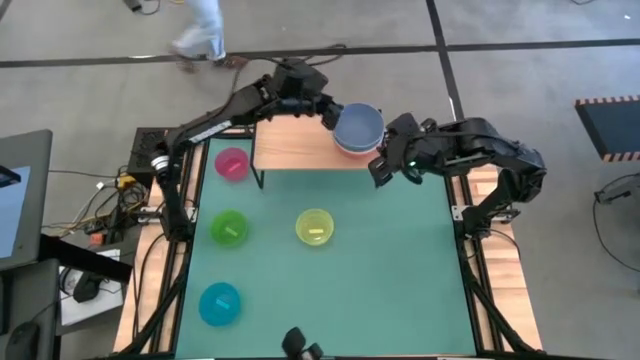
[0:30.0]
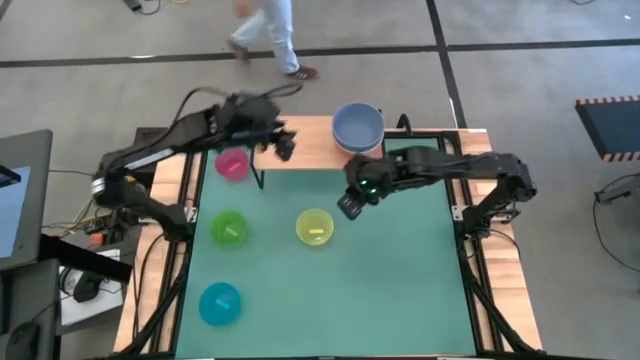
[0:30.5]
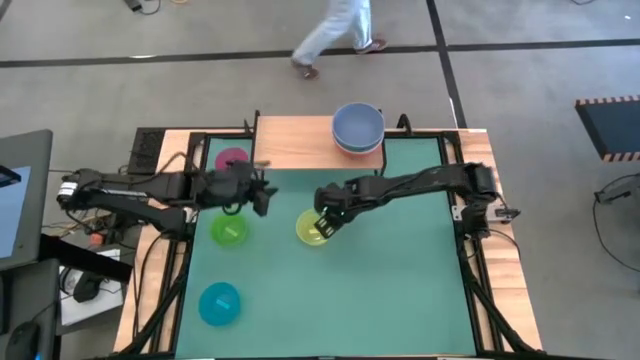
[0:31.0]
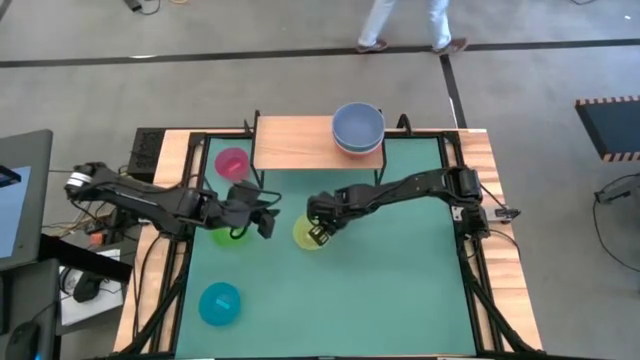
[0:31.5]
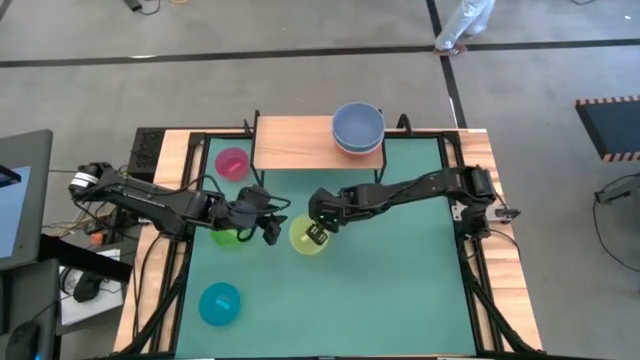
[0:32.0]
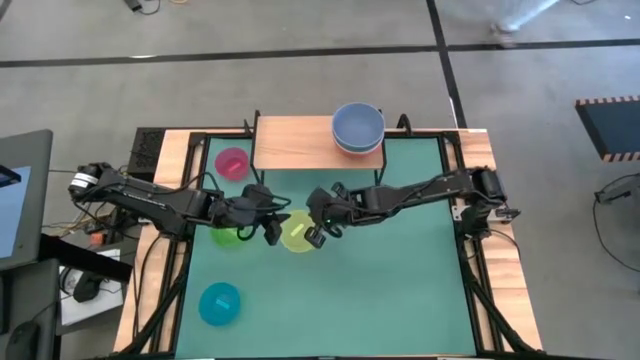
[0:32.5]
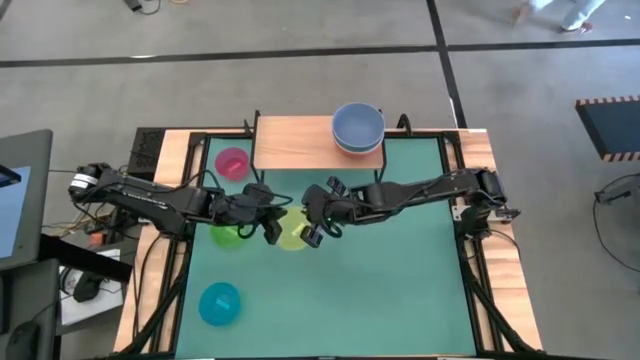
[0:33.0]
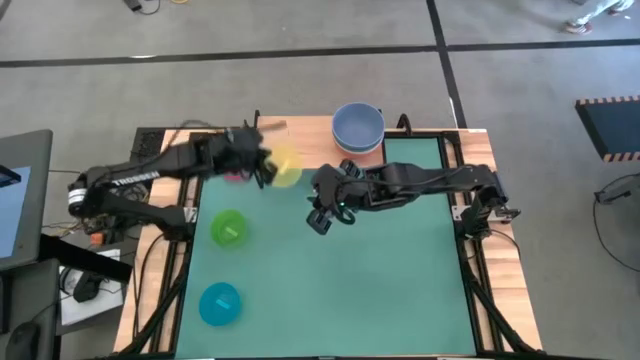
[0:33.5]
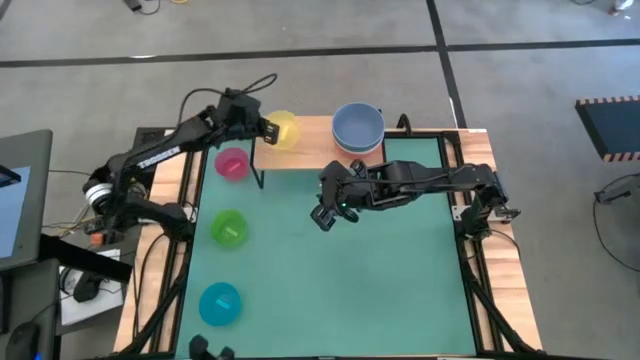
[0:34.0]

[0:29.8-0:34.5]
Task: Place and stack bowls onto a shelf
Put the yellow bowl on the shelf

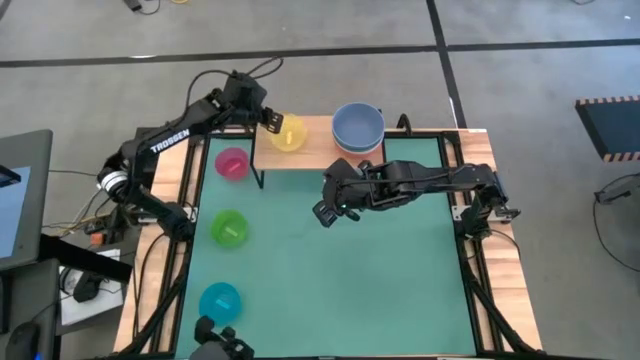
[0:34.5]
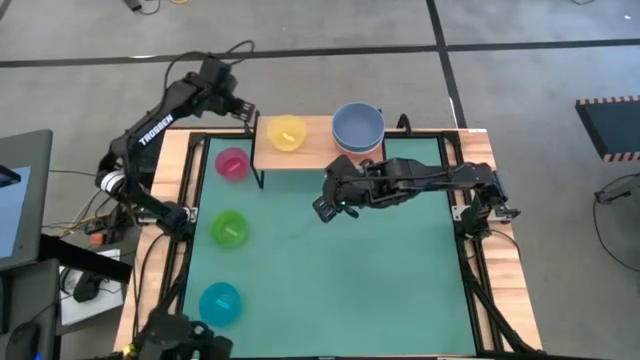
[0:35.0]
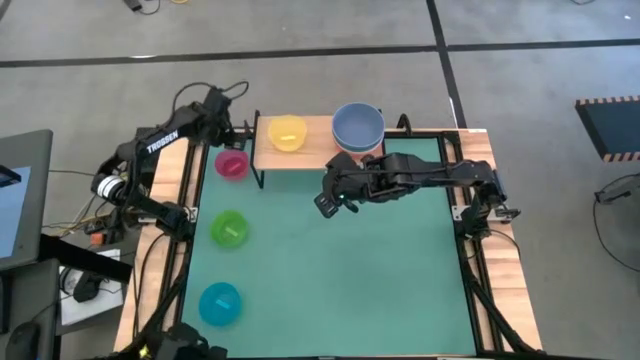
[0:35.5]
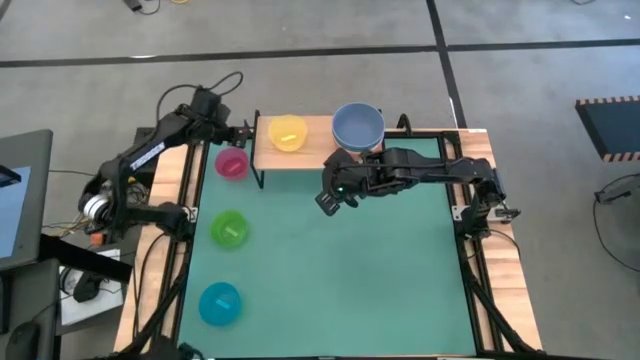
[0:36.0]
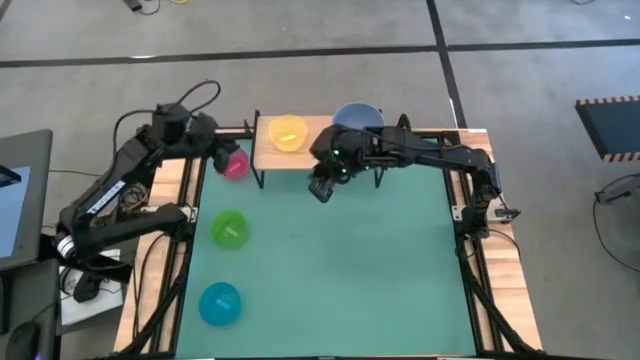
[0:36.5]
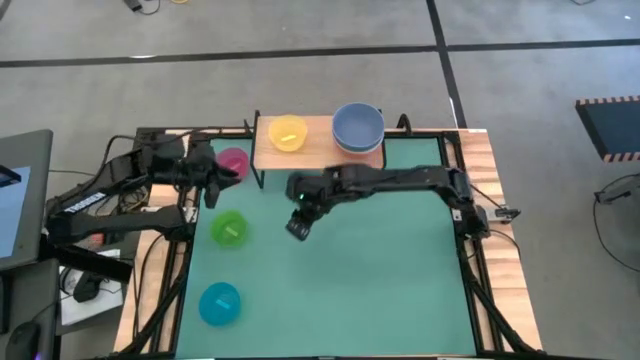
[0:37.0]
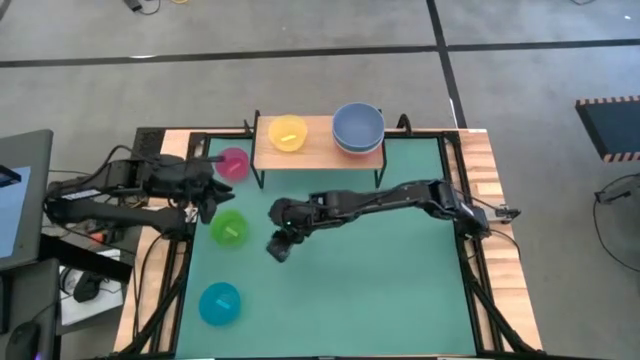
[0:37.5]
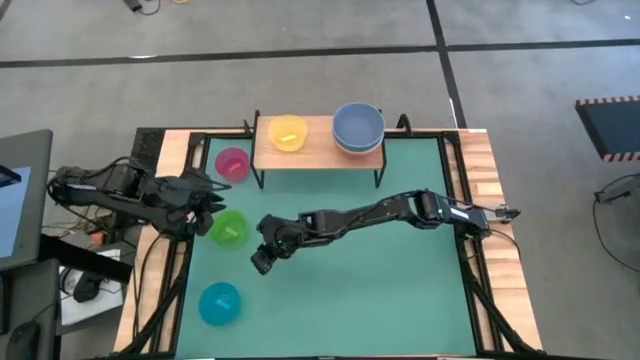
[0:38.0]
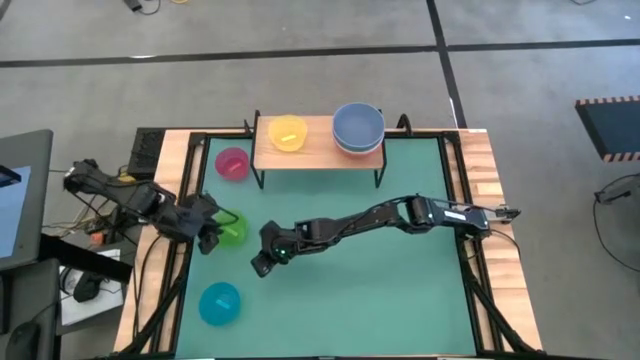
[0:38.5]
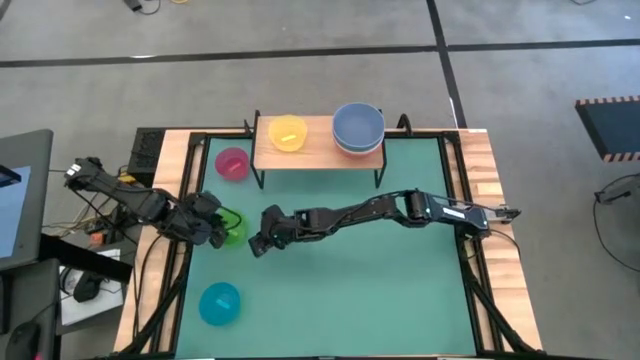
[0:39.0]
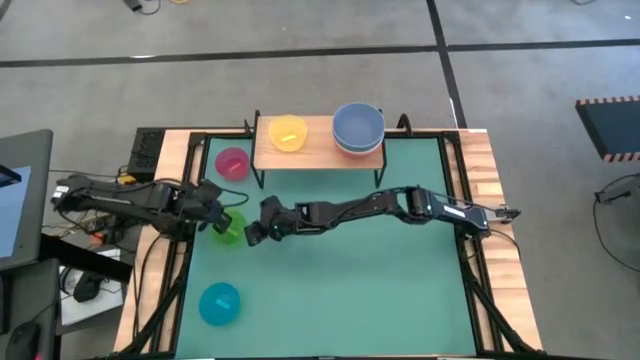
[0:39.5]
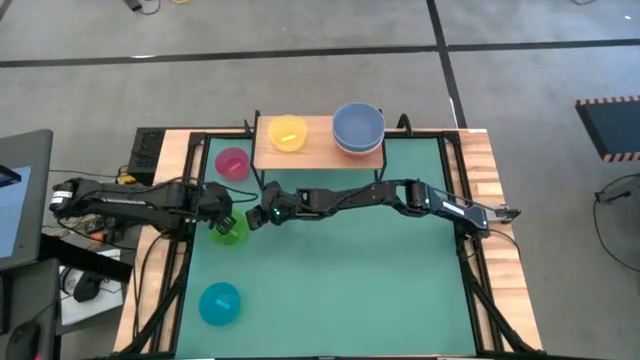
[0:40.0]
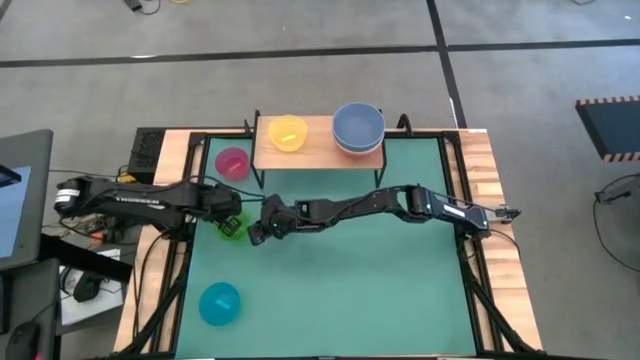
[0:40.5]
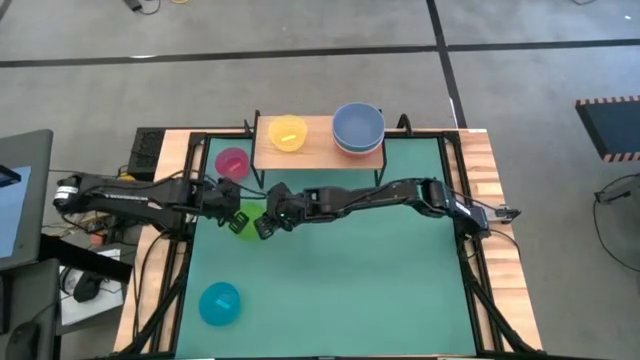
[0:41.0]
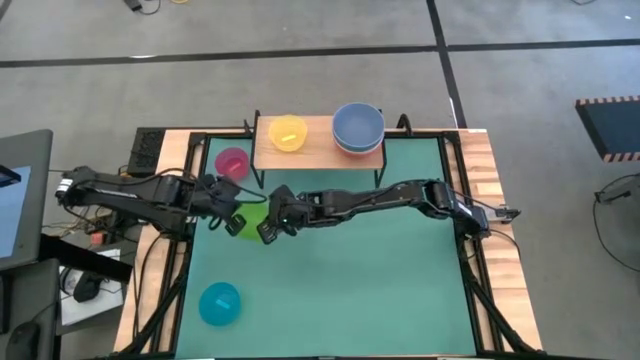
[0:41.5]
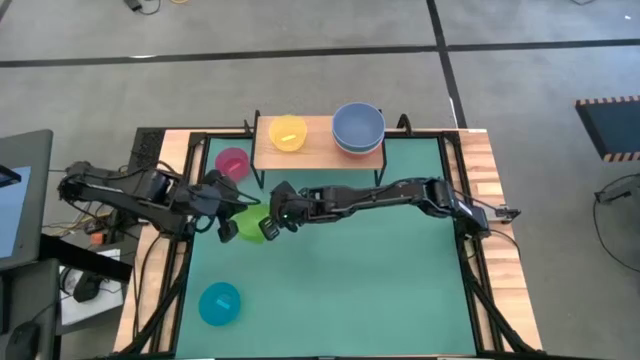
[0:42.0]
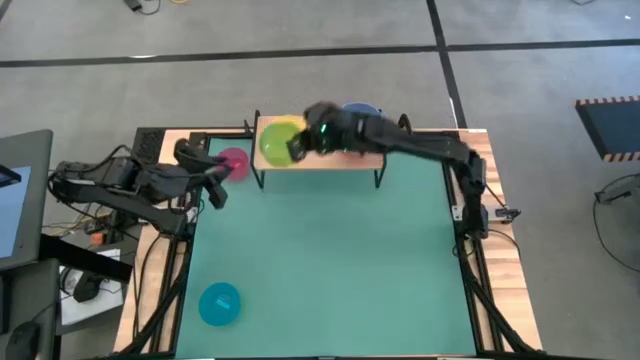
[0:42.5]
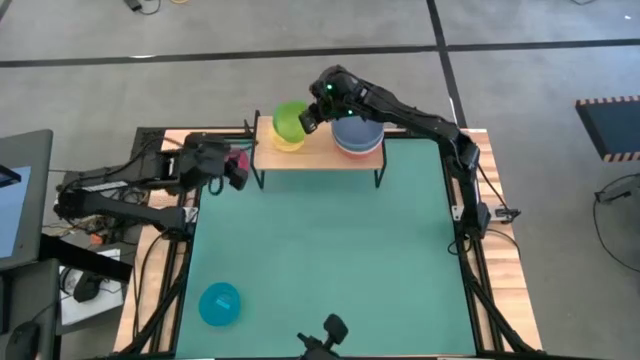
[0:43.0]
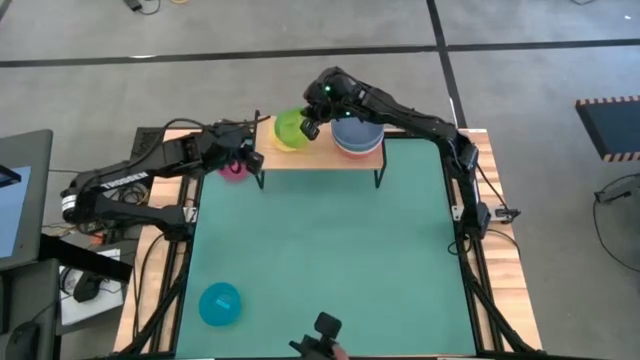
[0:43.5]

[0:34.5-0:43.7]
Stack the light green bowl on the yellow bowl on the shelf

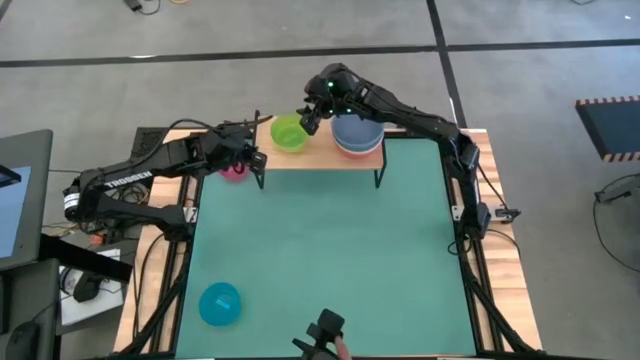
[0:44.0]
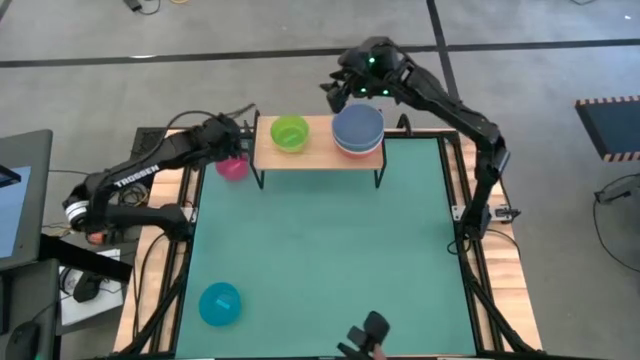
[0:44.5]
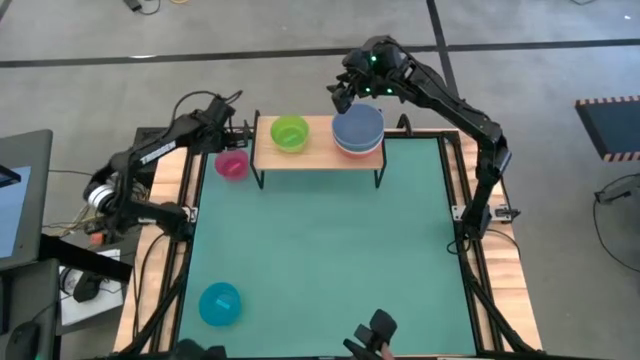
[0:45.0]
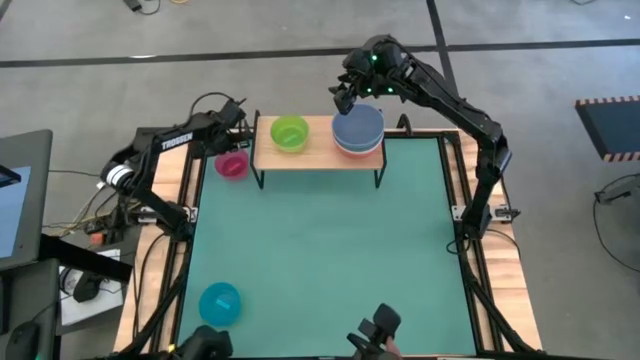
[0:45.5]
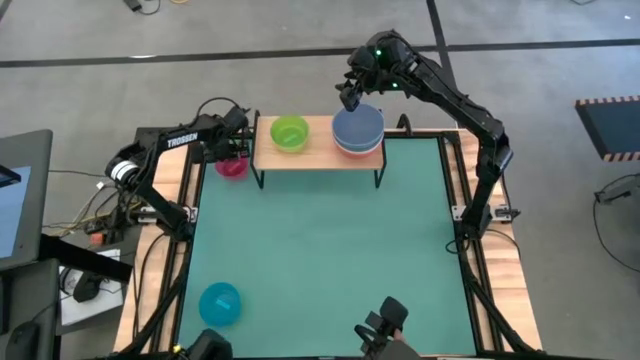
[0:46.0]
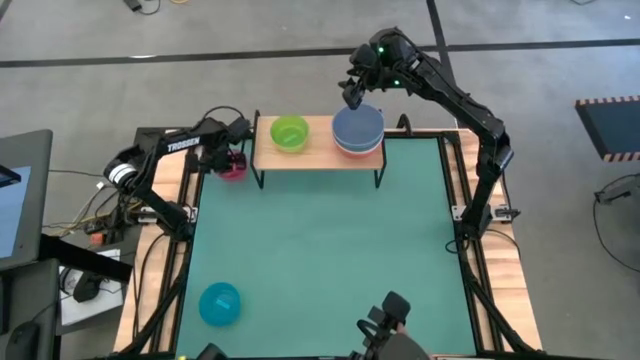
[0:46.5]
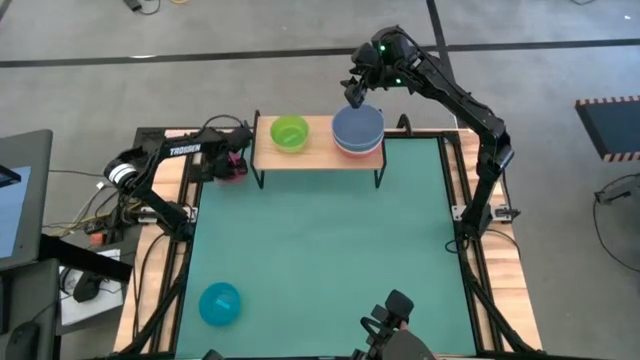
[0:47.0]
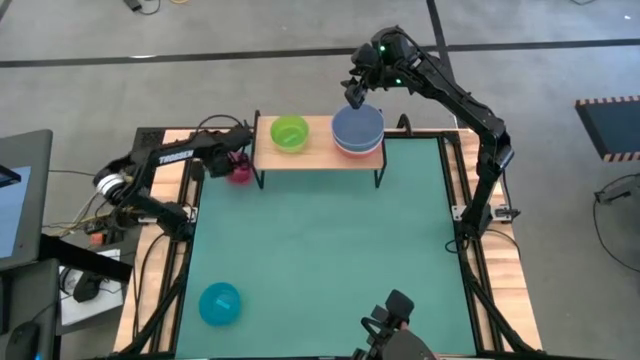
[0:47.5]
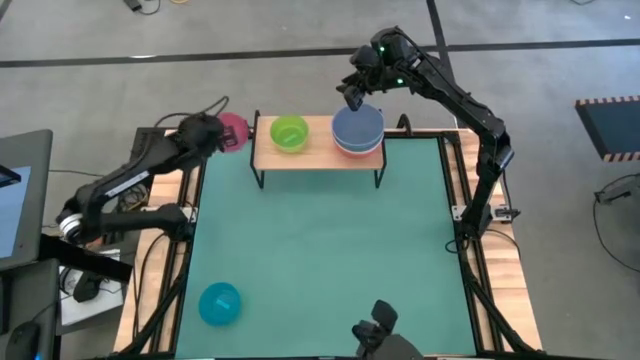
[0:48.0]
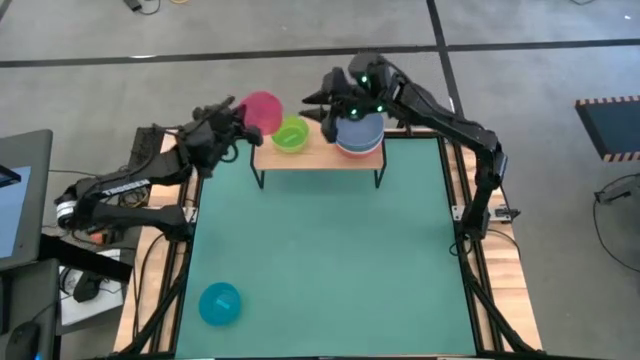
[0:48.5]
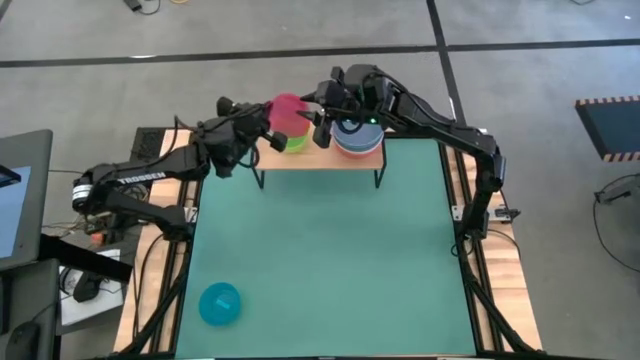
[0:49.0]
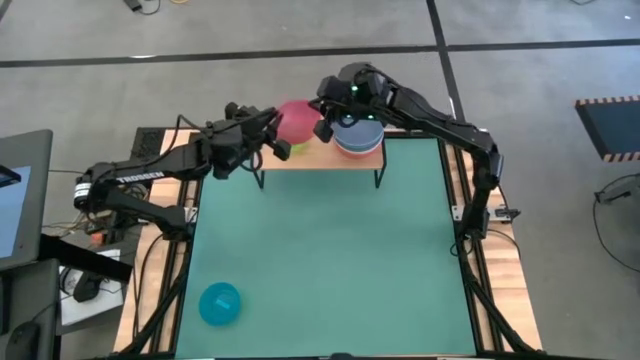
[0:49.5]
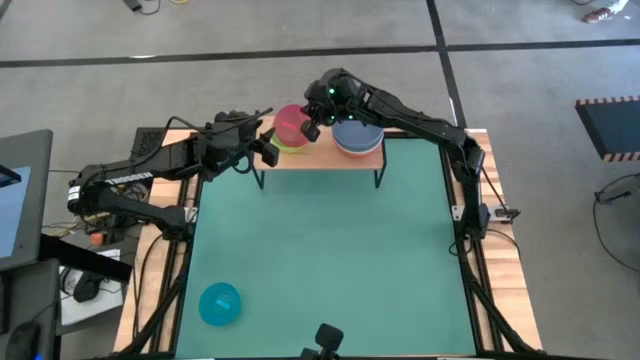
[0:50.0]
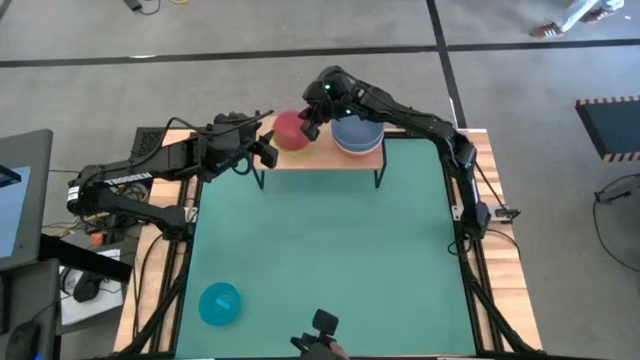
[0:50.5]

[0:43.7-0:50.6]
Stack the red bowl on the green bowl on the shelf
